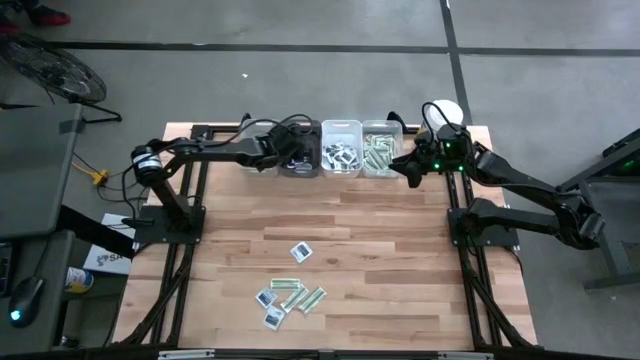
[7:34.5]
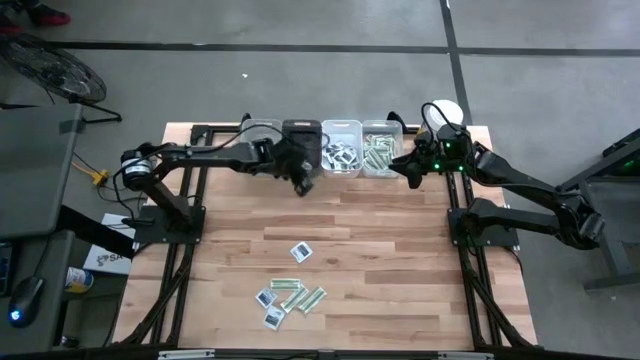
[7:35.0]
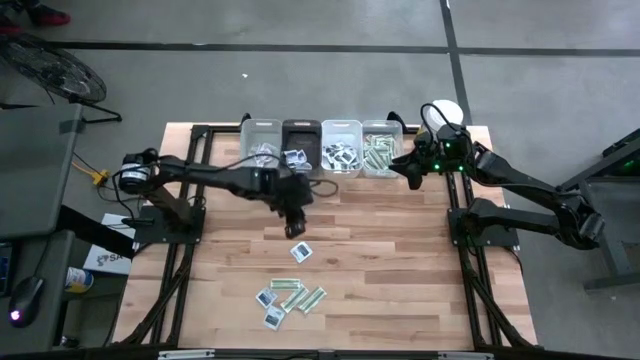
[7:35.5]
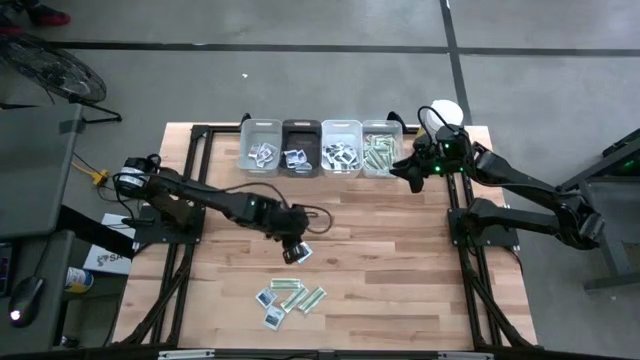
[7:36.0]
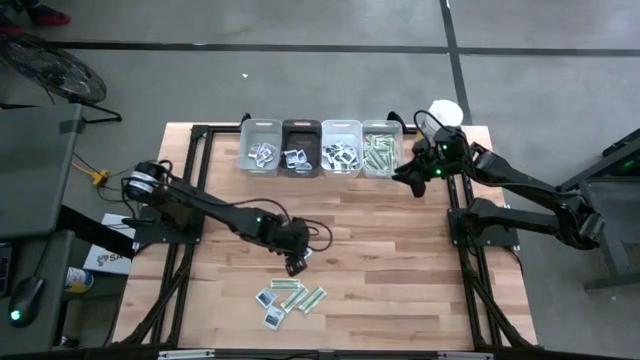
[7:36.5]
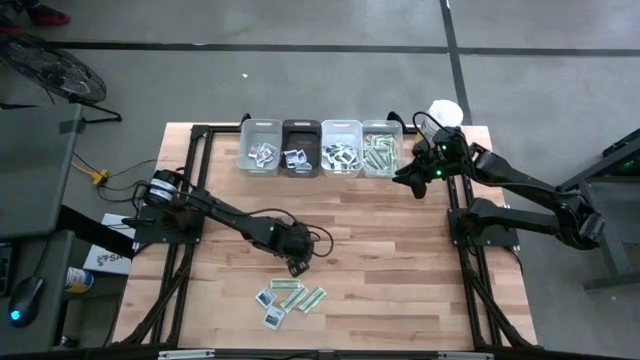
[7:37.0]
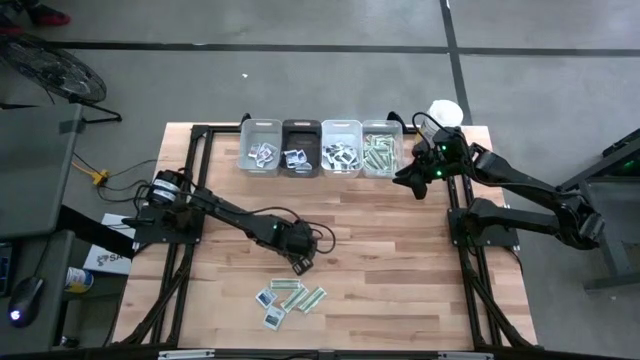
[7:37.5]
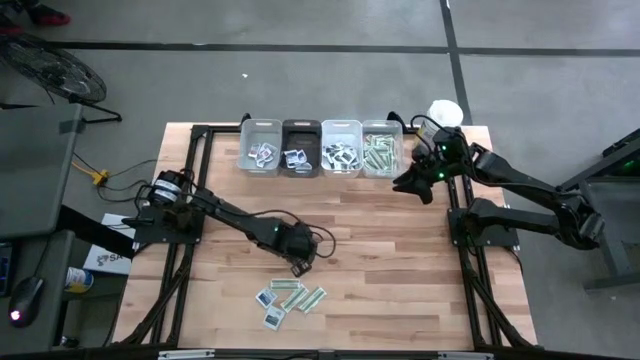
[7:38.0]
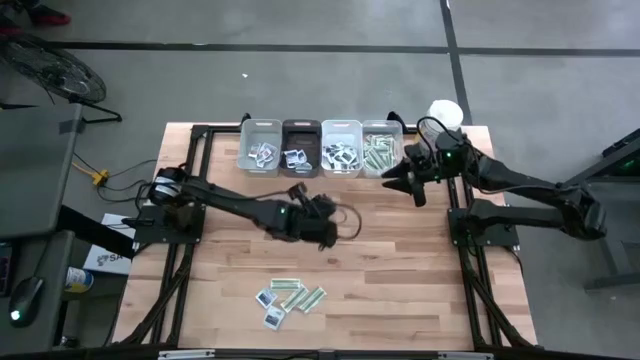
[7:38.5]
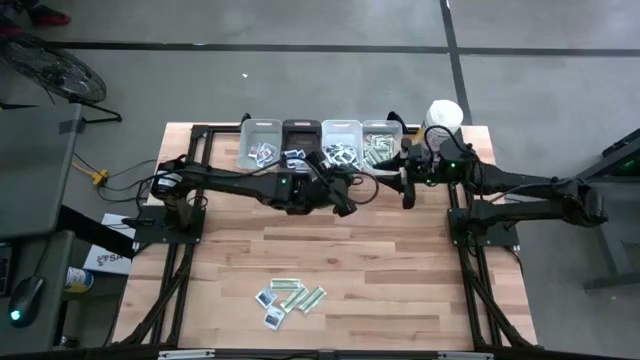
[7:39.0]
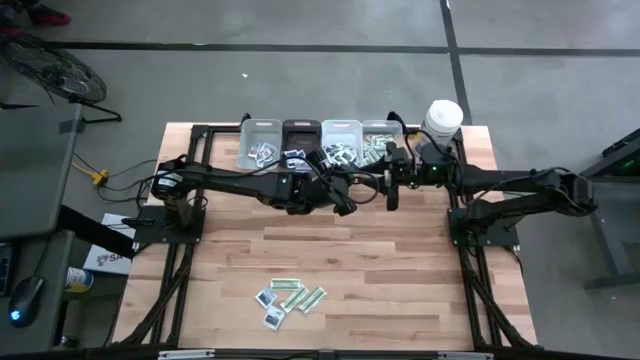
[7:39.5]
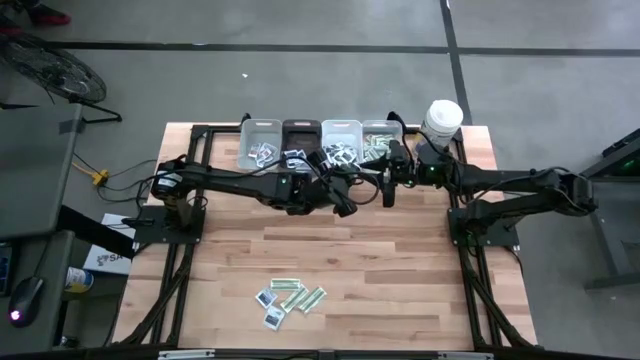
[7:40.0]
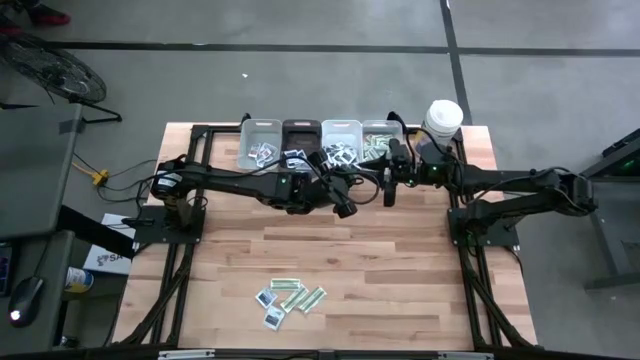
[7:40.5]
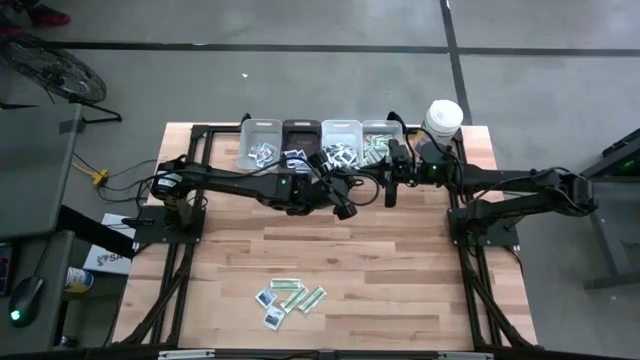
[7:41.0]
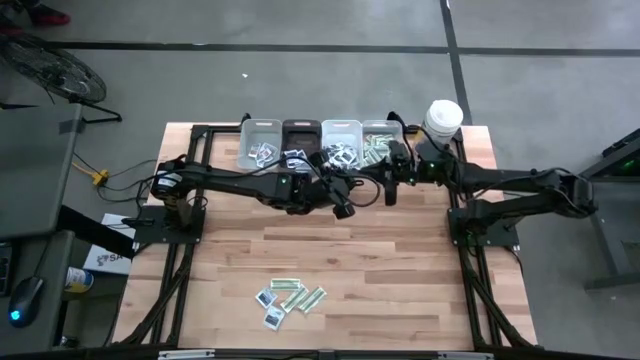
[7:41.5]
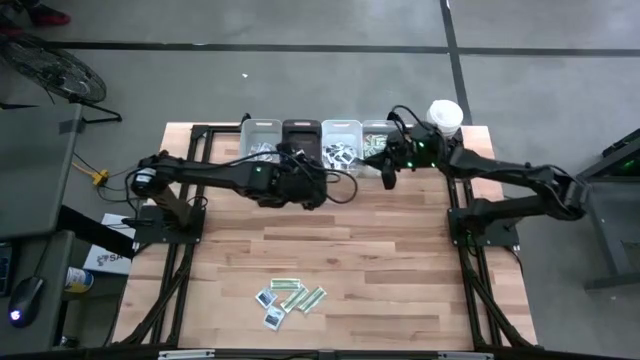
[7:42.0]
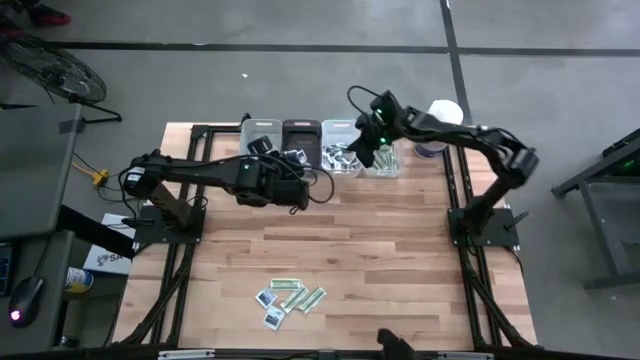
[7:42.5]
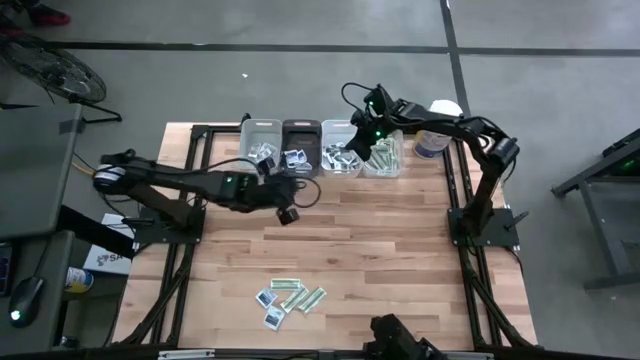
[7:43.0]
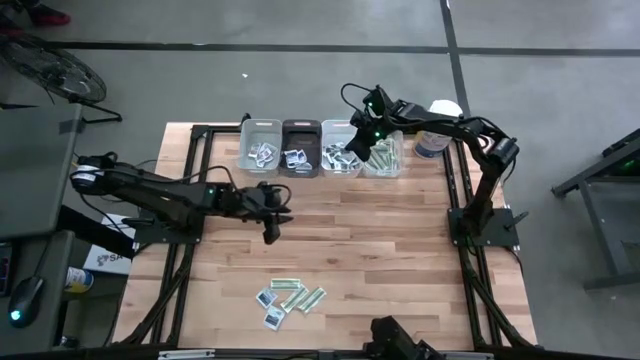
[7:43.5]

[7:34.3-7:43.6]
Task: Pick & Place First Aid Supplies
Put the black towelette pack into the white bin

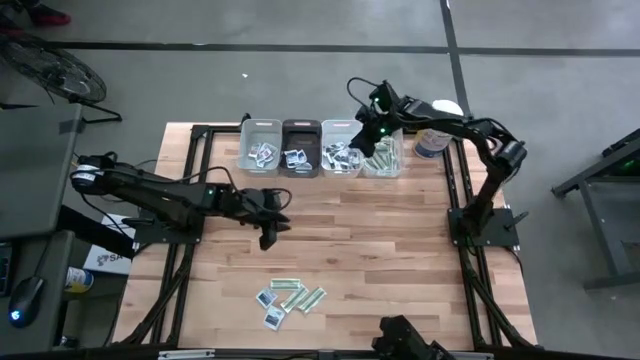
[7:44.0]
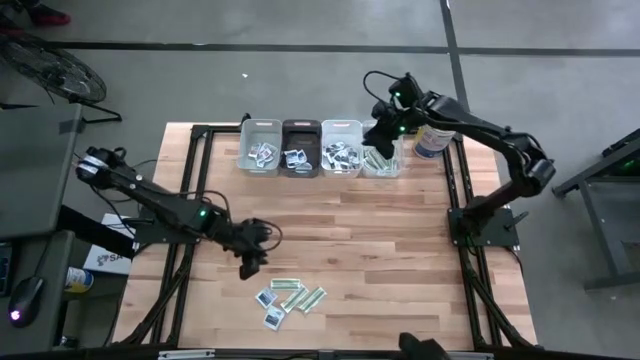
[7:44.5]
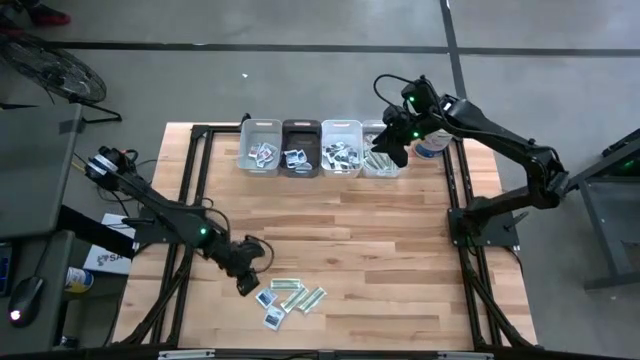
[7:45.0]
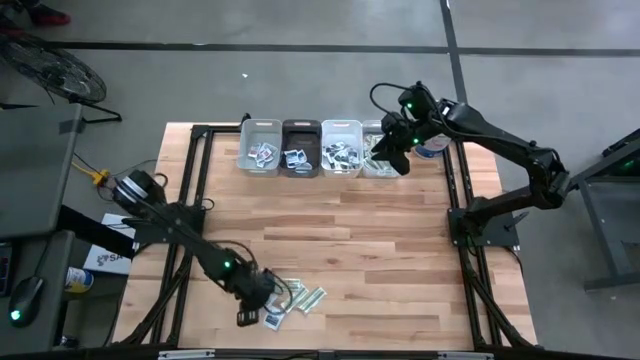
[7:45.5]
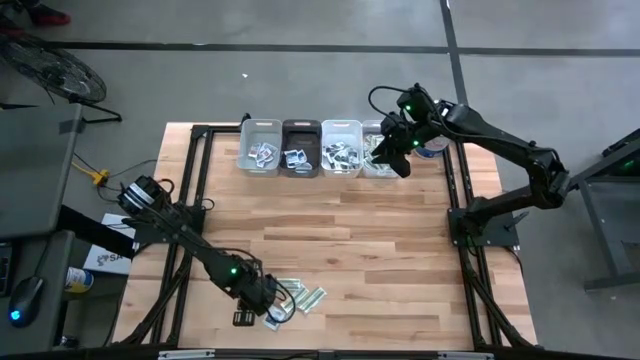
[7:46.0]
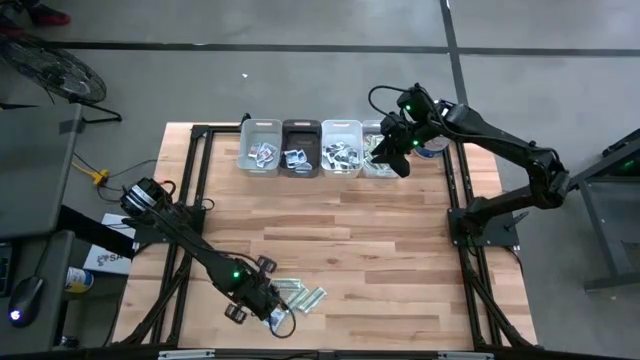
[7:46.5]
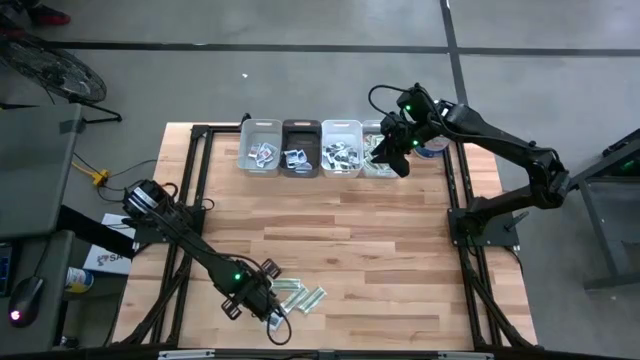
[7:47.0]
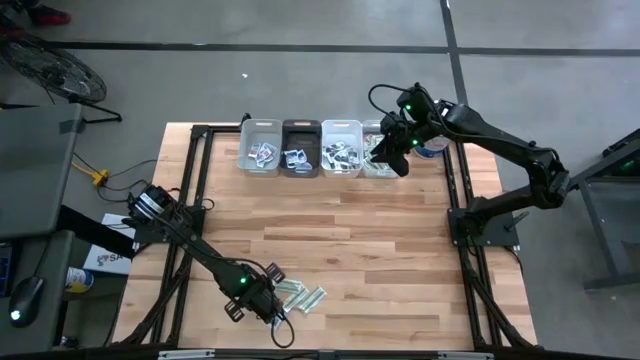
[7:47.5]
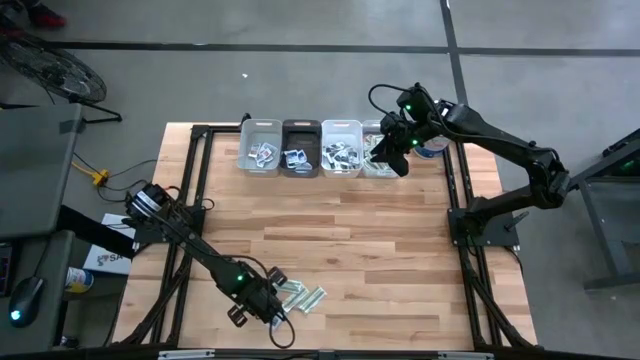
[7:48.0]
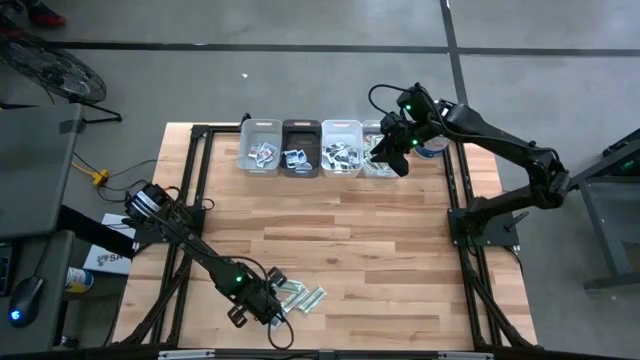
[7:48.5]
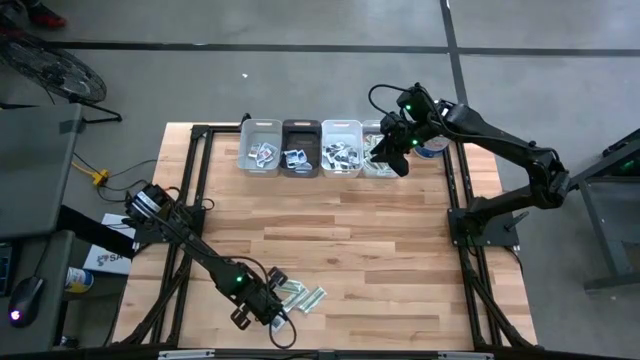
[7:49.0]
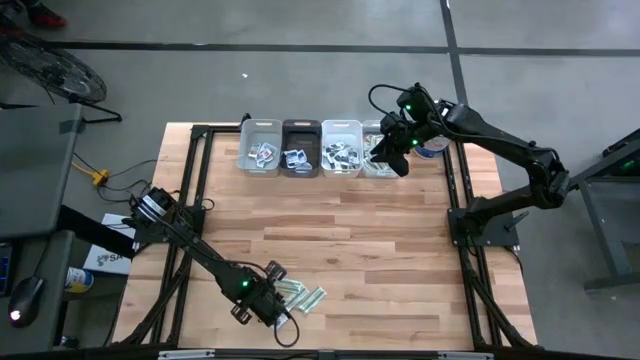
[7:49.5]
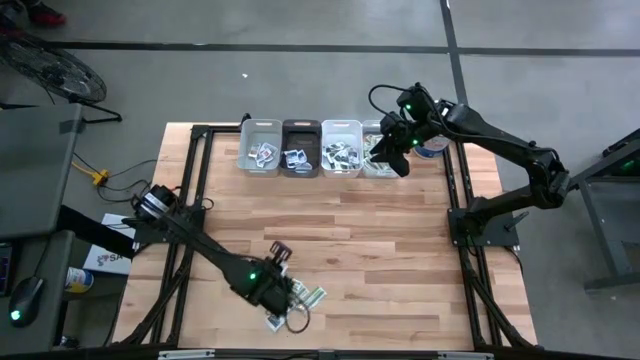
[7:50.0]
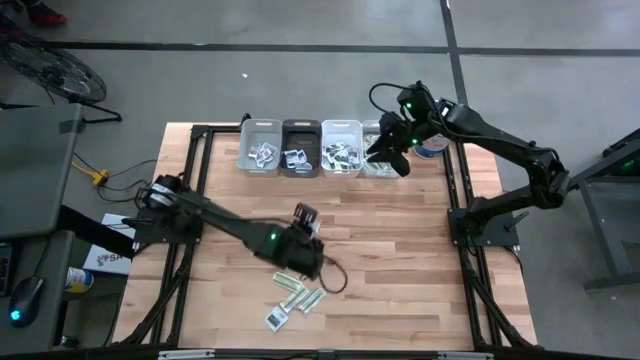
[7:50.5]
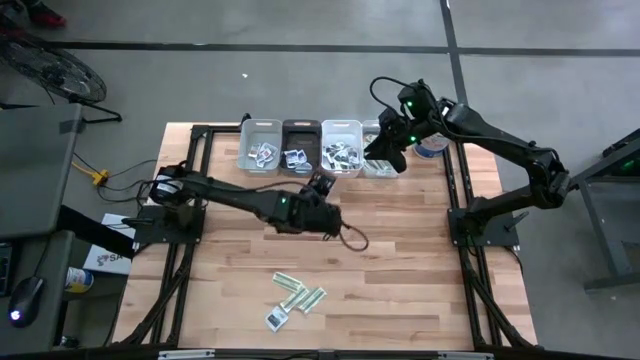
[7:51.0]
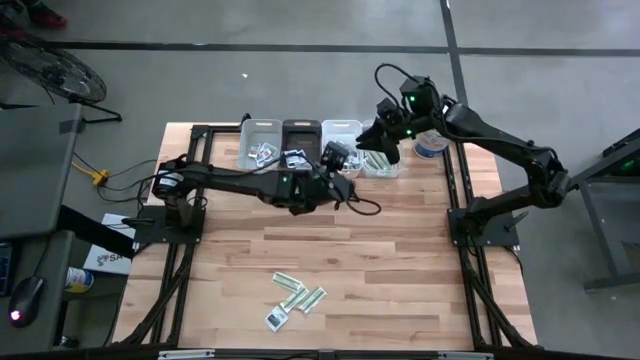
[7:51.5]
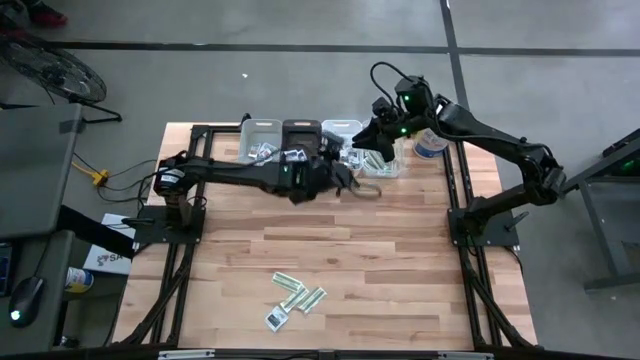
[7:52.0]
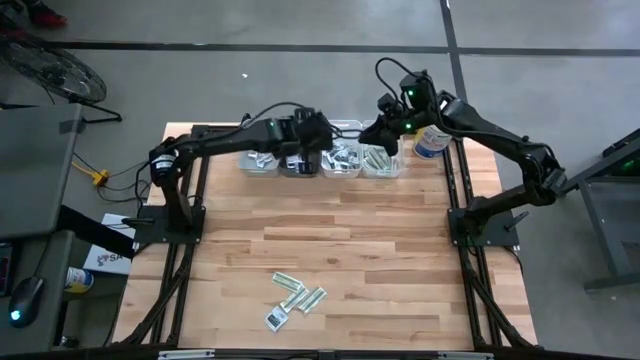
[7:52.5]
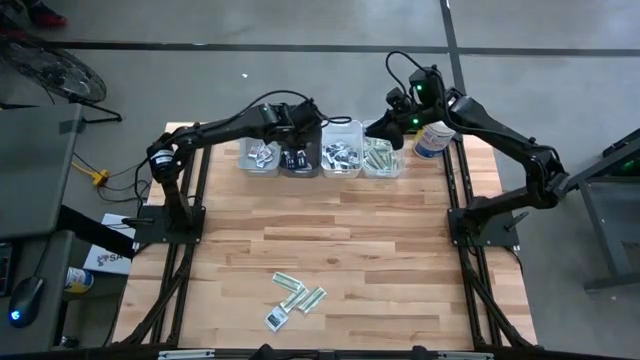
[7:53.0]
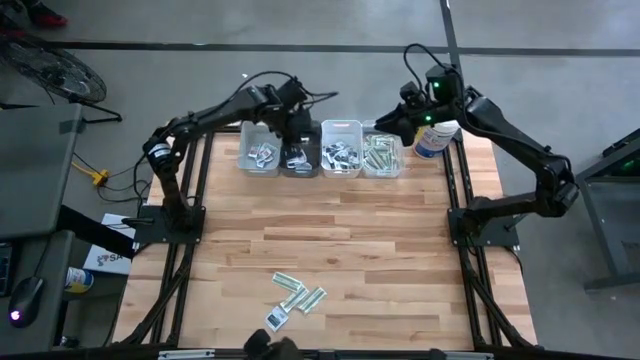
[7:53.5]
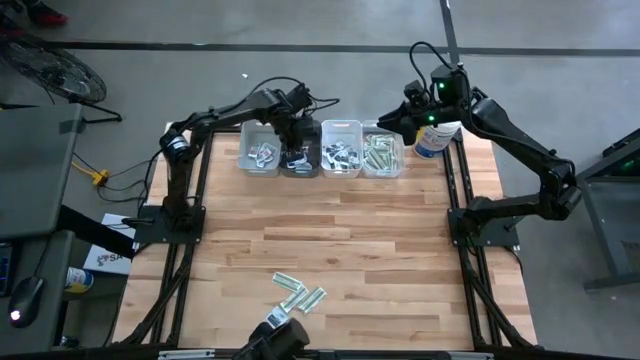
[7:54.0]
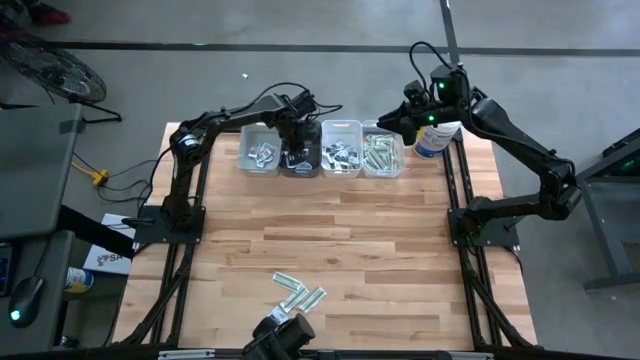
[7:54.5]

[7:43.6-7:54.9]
Put the blue alcohol pad into the black bin

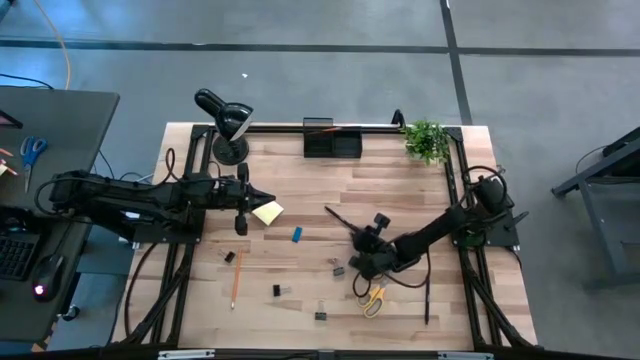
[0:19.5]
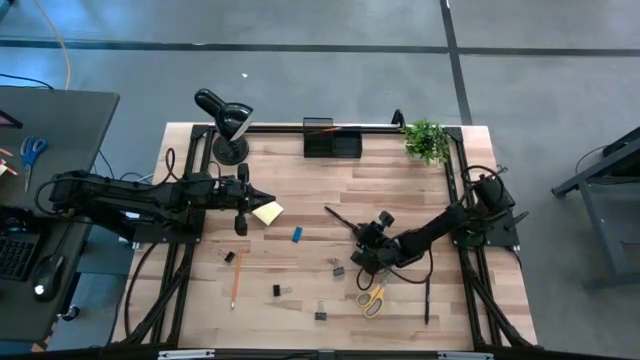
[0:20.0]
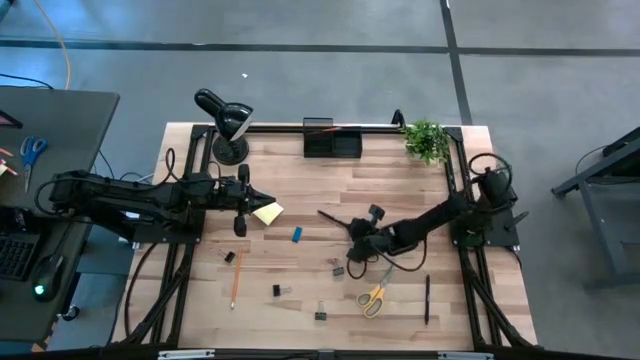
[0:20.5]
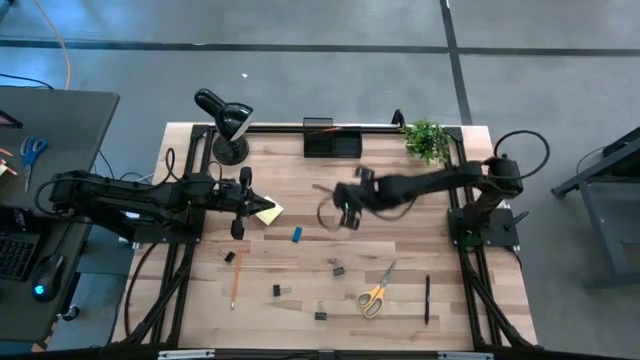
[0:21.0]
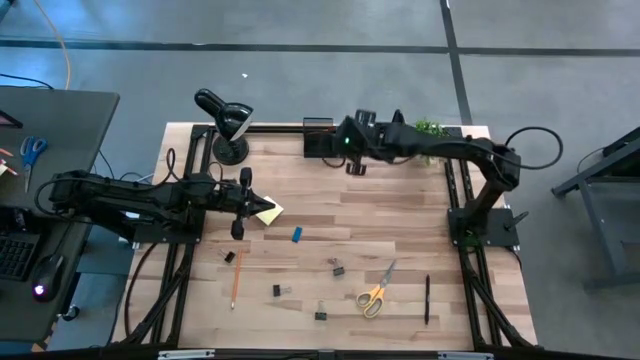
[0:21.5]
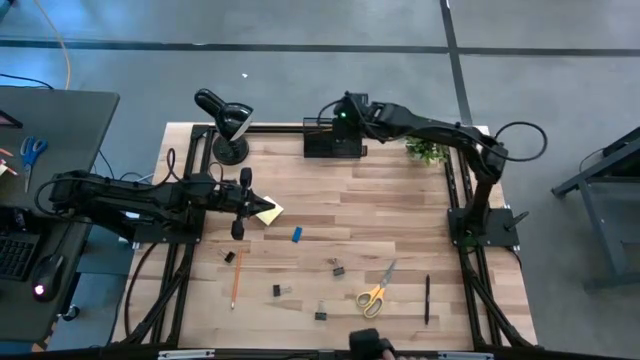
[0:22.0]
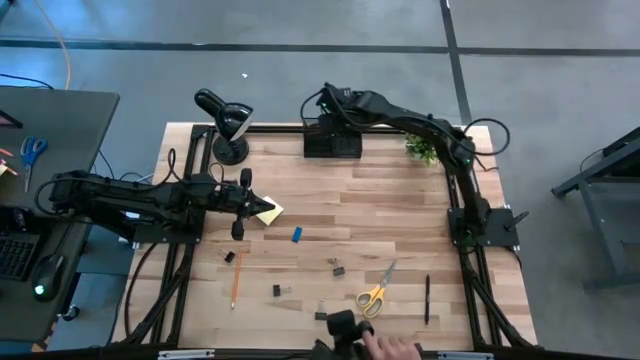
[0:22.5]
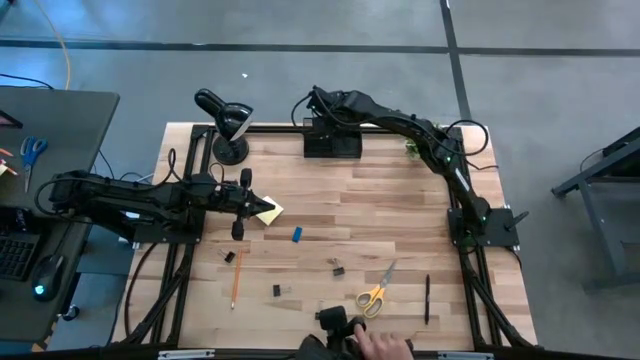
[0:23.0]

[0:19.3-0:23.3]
Task: Pick and place office supplies into organizer
Put the black pen into the black desk organizer
